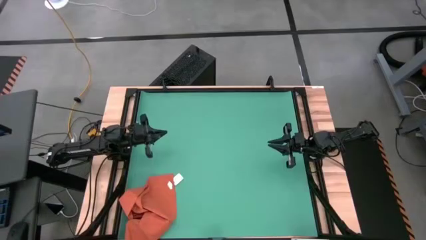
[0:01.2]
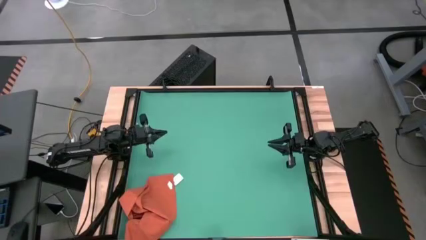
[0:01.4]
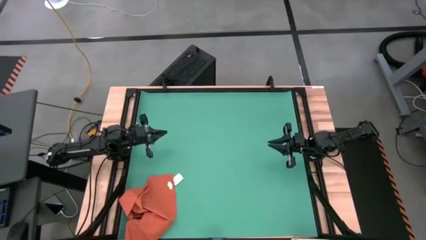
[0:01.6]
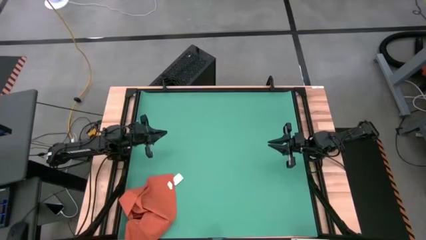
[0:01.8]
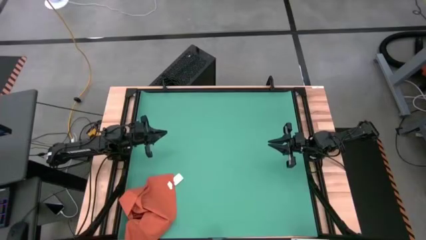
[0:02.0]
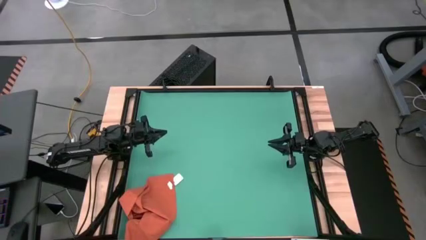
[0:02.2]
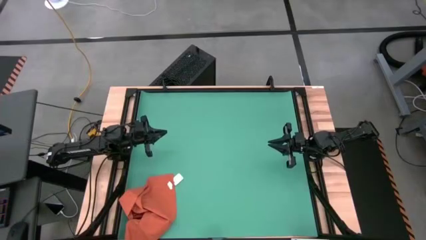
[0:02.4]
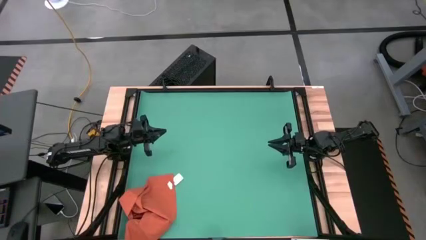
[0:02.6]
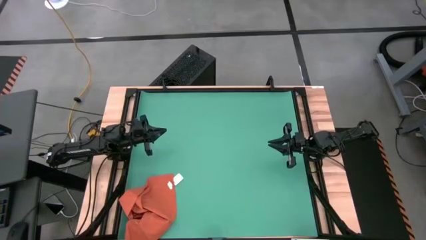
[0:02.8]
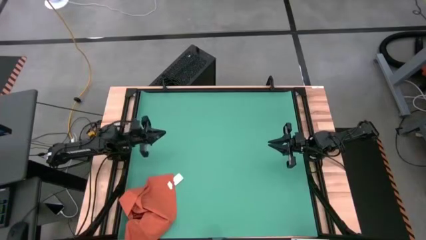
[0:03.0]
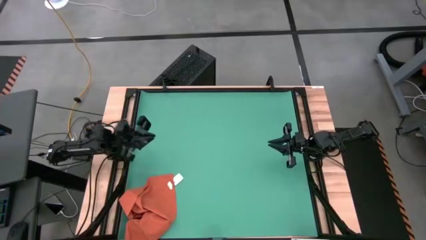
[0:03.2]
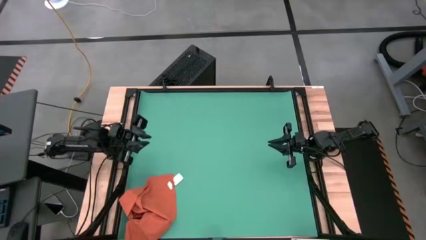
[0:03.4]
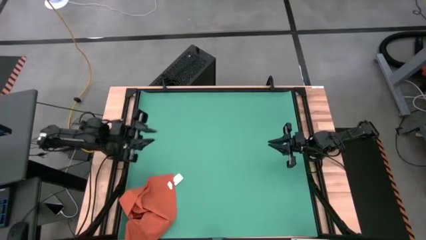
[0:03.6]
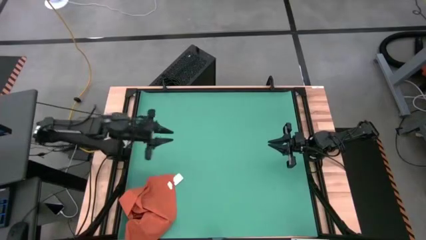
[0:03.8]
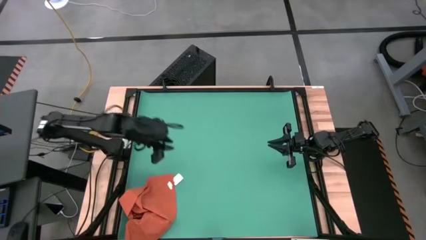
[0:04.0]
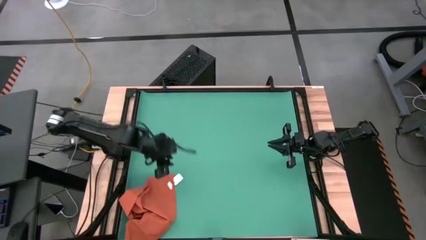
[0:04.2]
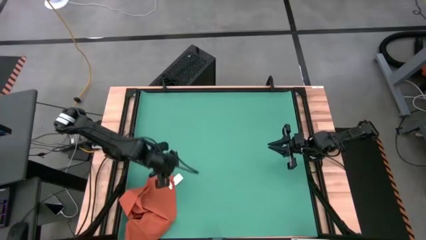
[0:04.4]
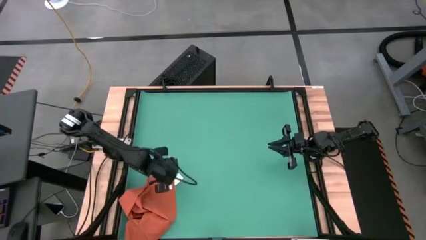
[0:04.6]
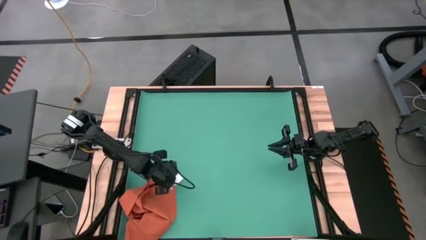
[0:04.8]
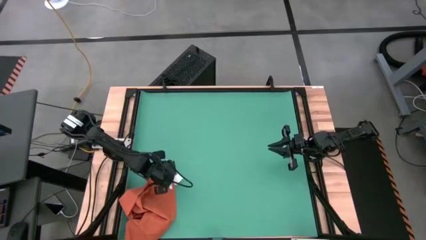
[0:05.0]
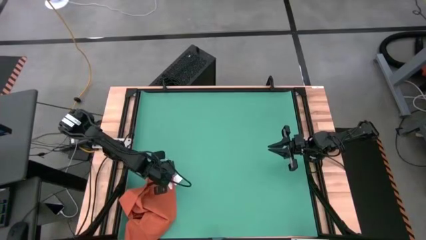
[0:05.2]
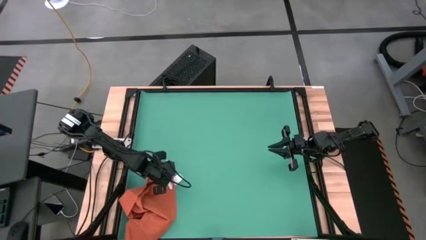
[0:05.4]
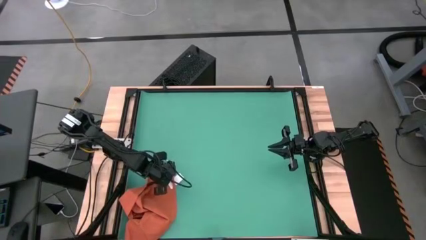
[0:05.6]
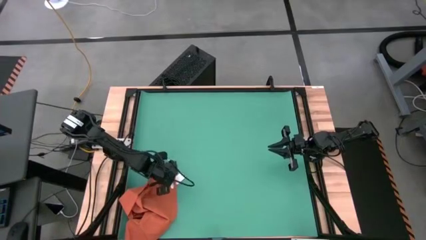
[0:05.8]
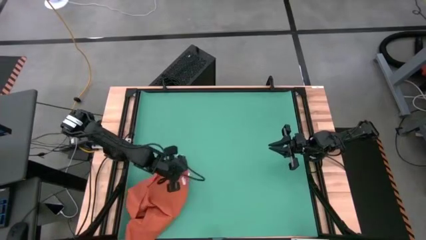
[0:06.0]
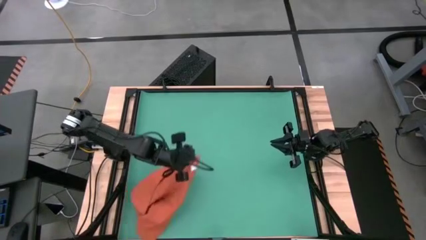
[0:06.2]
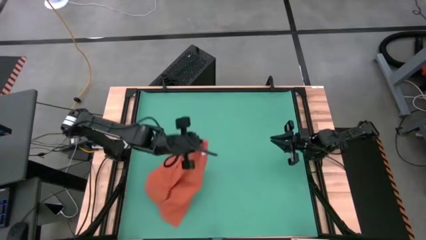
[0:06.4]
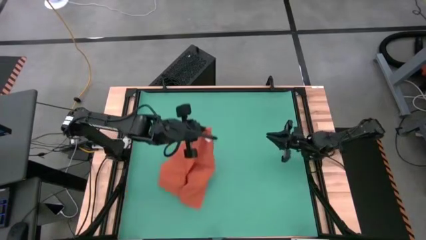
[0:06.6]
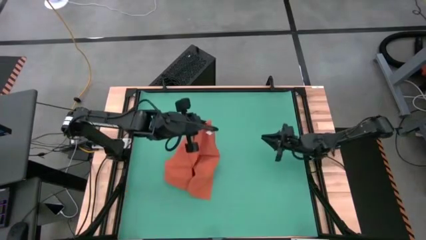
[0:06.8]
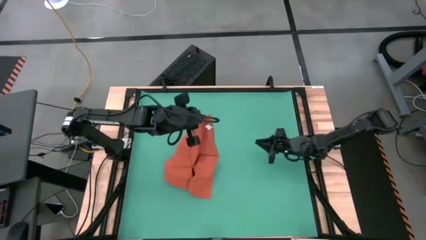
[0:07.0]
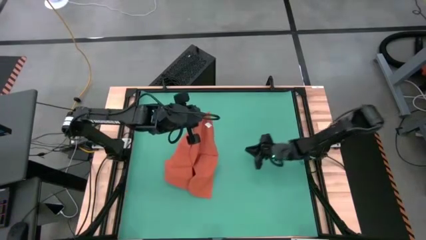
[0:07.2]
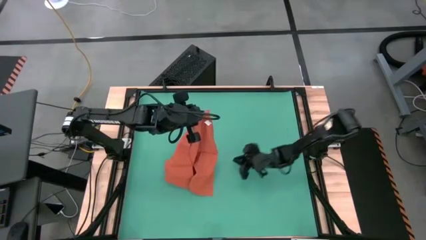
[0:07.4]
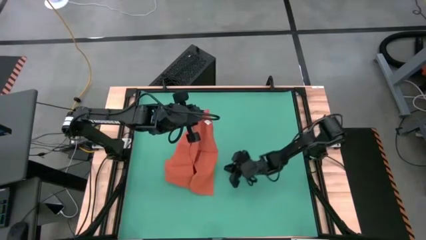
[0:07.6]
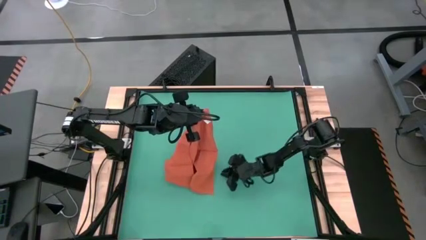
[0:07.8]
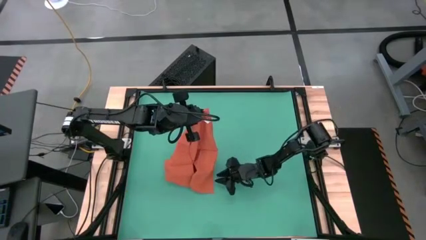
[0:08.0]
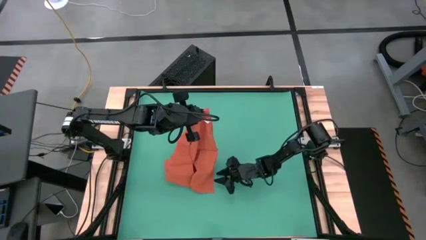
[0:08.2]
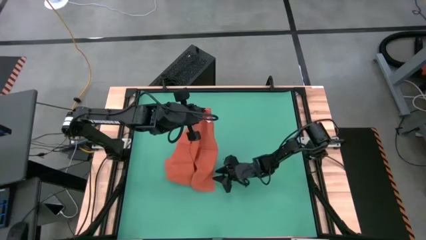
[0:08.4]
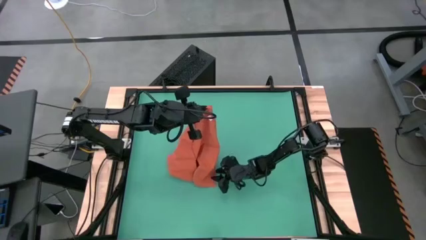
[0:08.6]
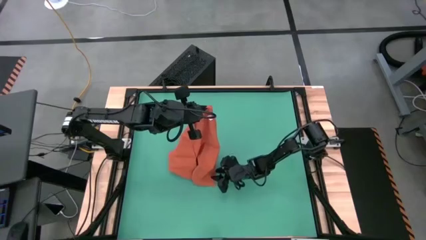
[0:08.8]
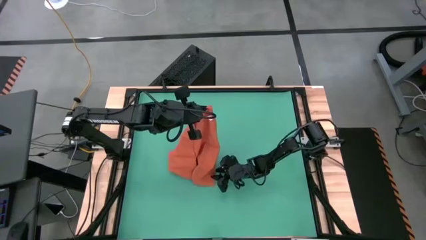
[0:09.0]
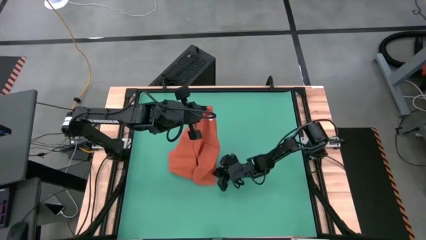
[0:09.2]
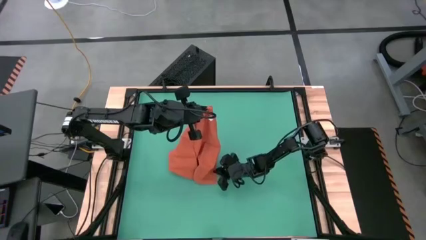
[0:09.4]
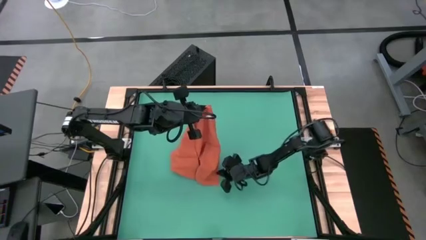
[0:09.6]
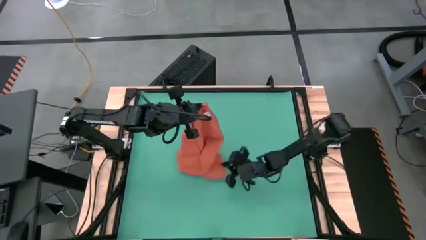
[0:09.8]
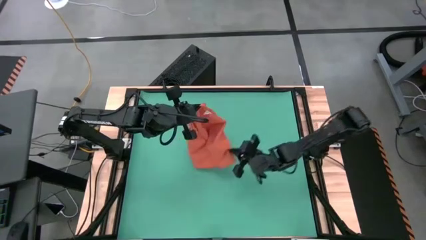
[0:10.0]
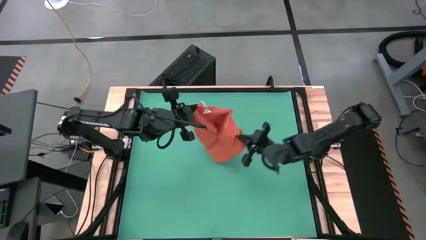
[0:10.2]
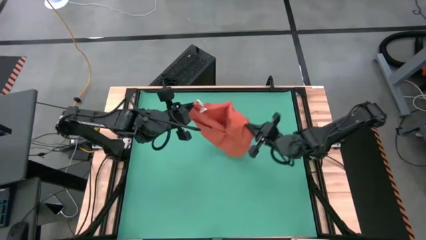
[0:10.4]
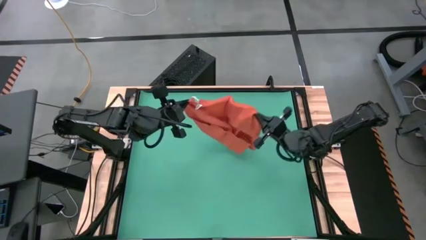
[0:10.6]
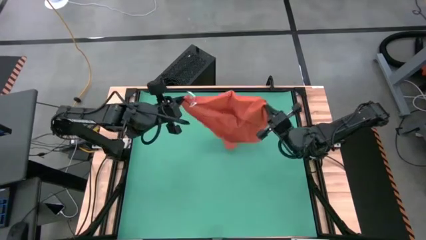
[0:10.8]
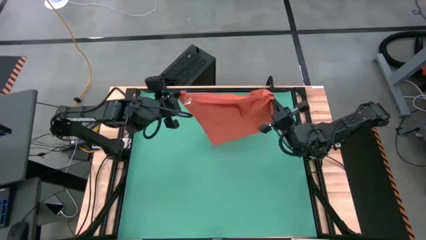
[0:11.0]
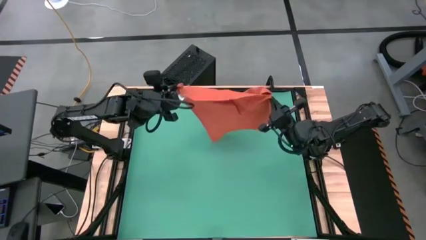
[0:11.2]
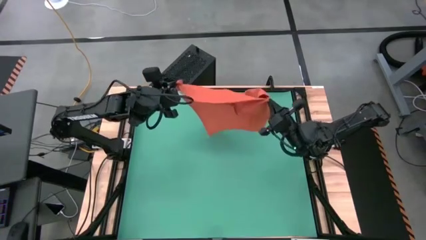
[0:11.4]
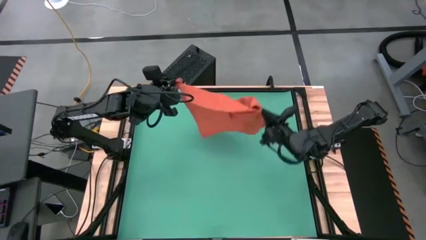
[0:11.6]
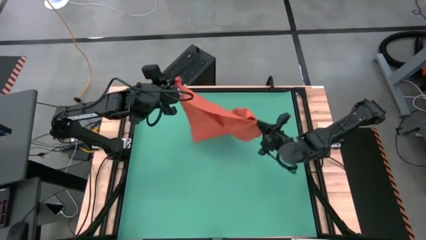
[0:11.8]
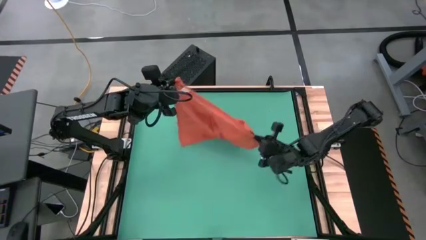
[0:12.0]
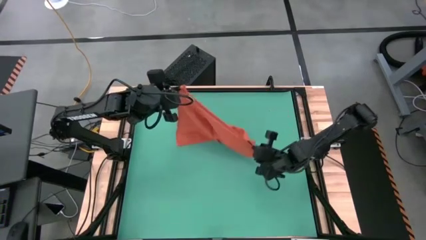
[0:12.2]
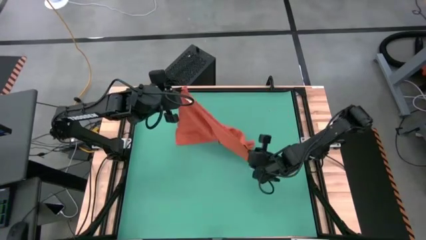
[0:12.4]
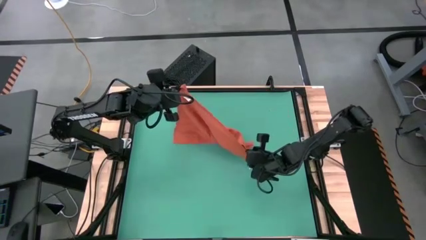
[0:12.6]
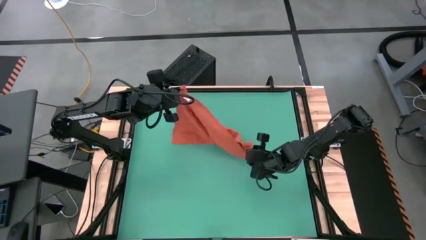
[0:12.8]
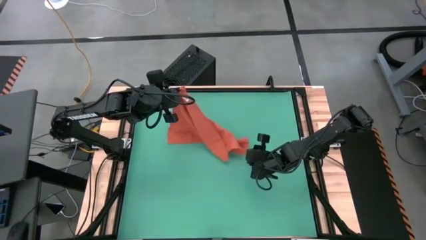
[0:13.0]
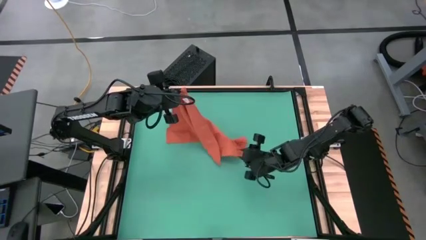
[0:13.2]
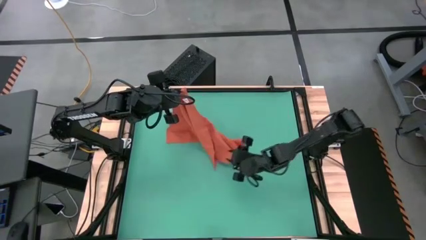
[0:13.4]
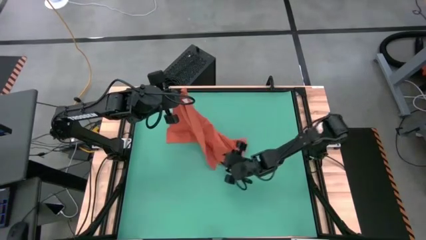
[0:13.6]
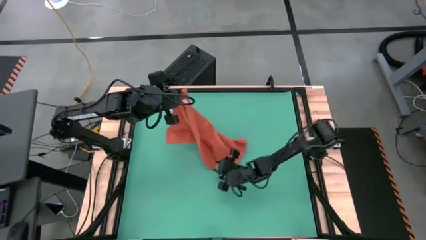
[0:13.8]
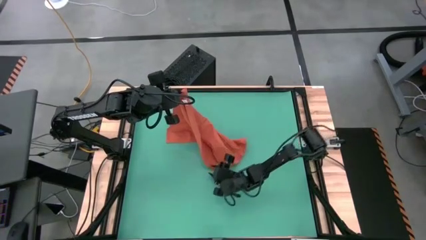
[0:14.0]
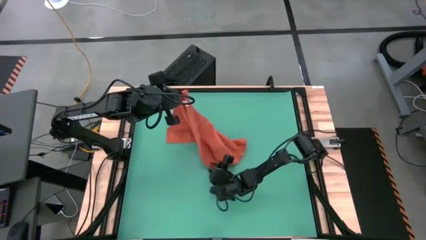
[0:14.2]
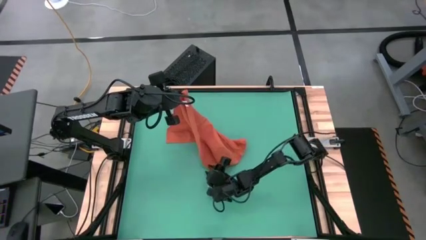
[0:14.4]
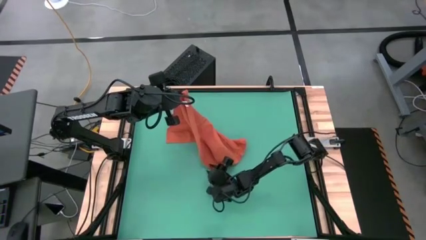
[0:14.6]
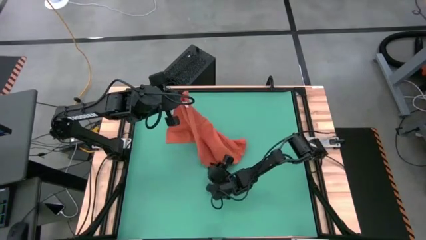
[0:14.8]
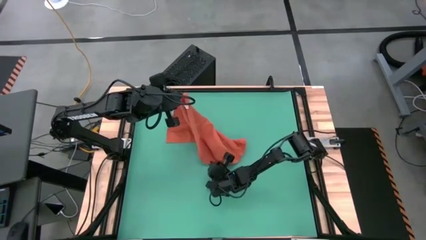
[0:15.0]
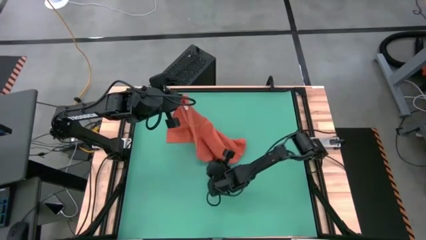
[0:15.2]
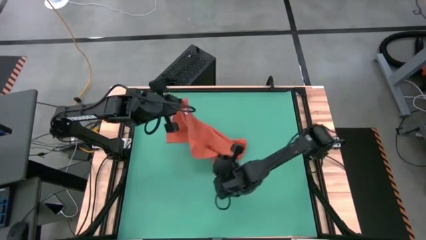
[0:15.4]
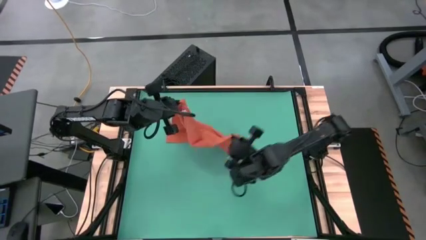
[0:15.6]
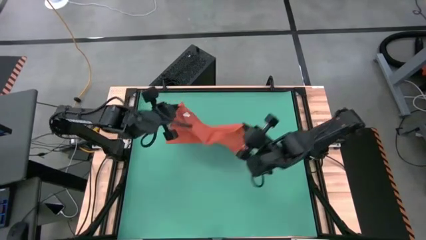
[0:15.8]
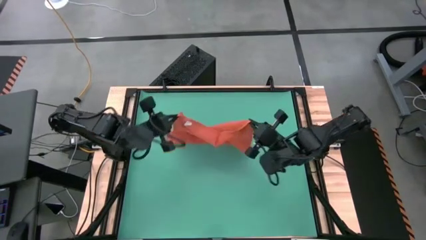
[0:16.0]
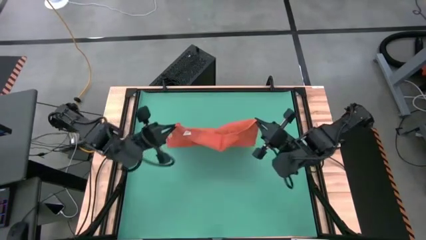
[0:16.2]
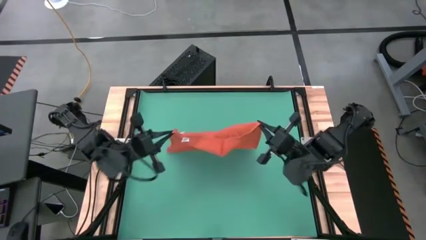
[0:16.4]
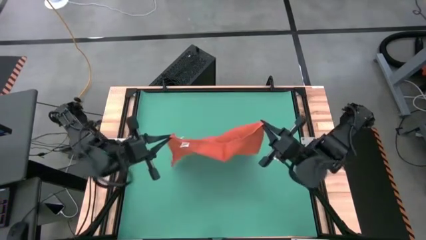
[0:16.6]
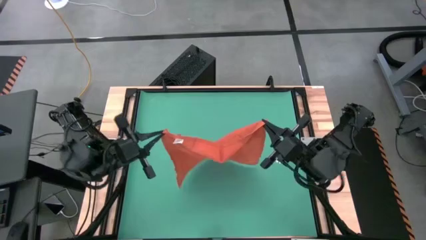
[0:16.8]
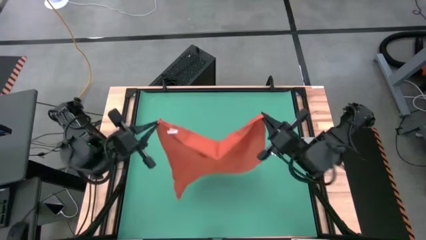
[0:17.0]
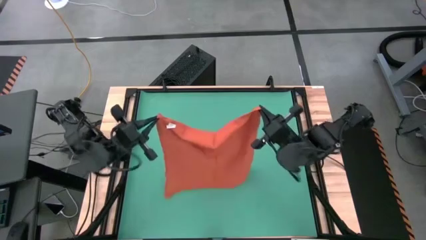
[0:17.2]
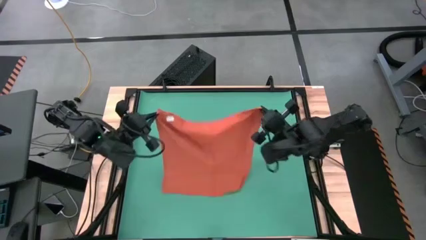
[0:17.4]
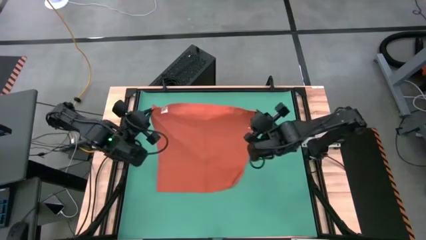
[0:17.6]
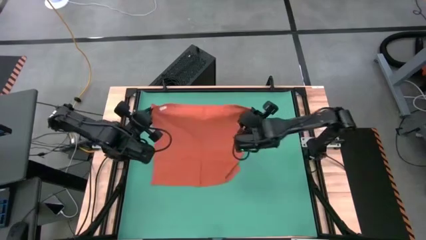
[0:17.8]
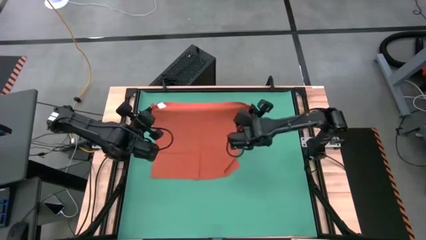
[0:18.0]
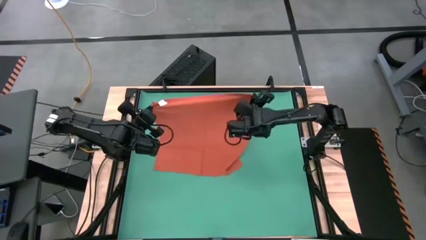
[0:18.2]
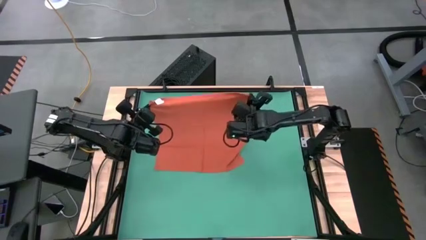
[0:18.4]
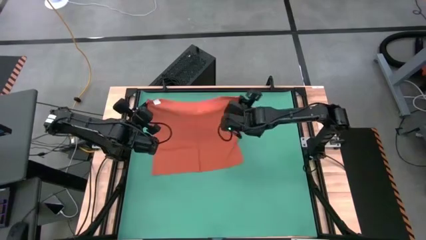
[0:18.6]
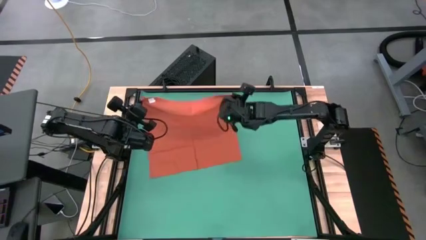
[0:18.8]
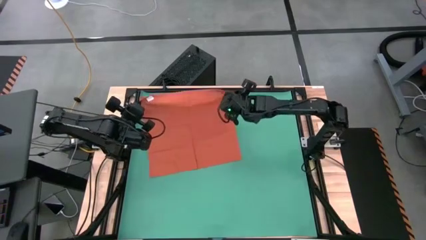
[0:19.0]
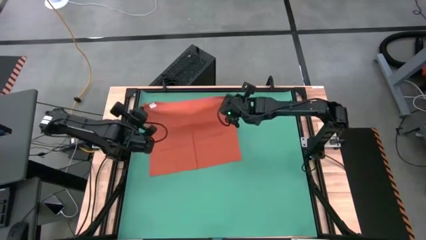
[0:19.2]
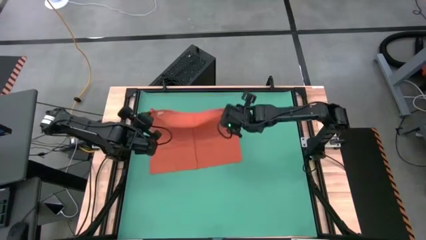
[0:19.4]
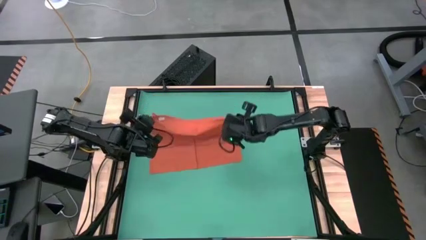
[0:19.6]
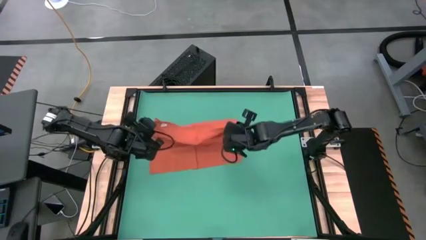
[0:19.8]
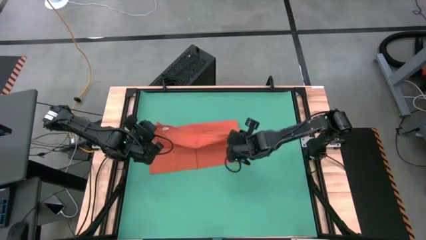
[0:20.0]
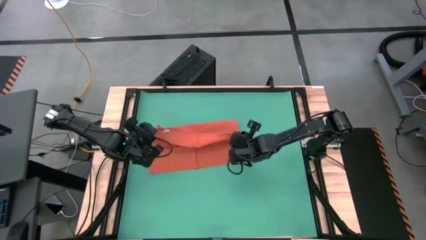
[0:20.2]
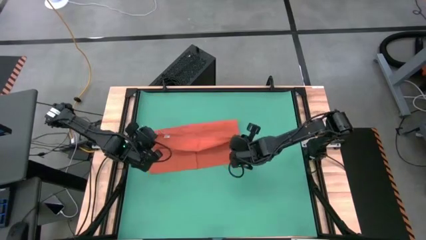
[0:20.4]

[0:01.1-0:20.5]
Task: Roll towel
Fold the orange towel
